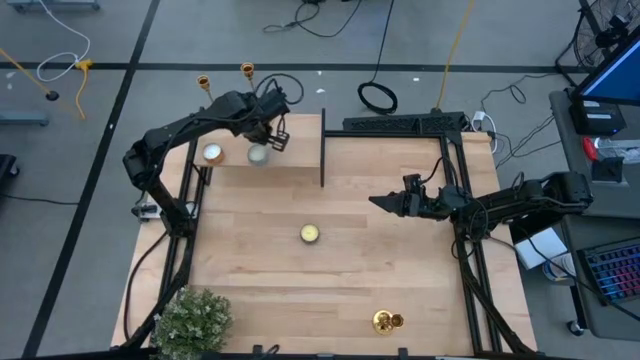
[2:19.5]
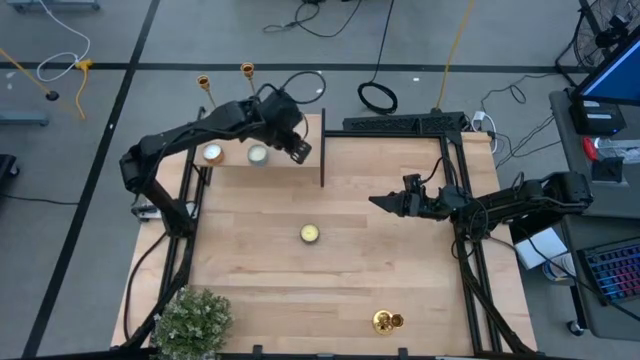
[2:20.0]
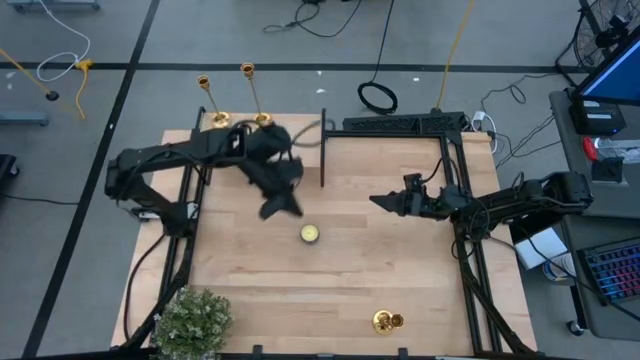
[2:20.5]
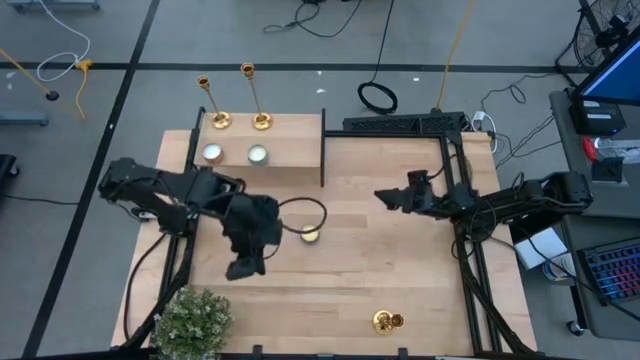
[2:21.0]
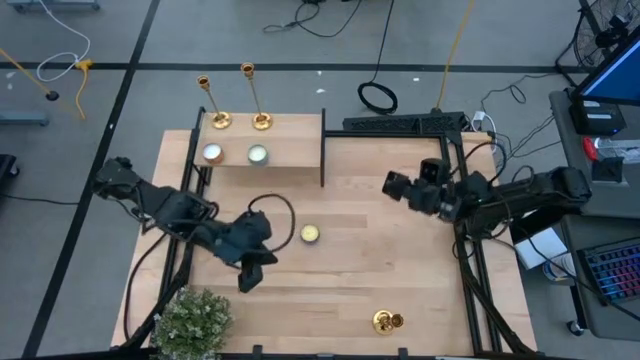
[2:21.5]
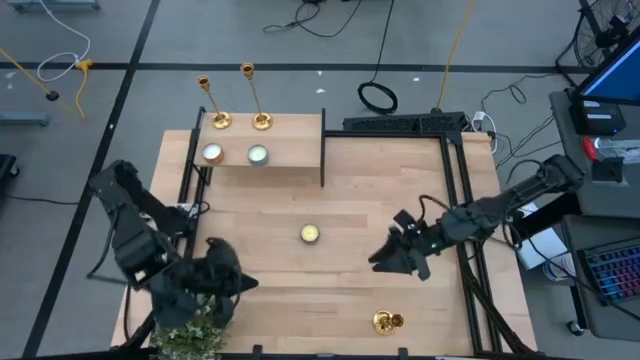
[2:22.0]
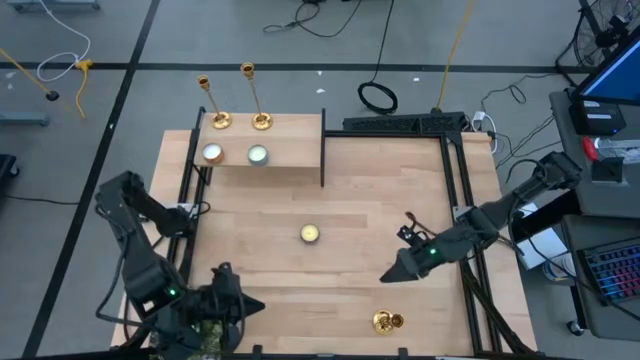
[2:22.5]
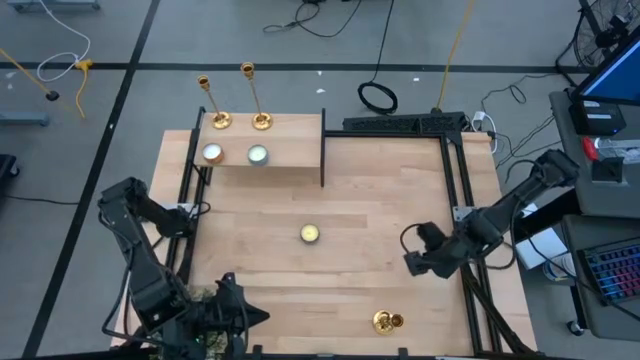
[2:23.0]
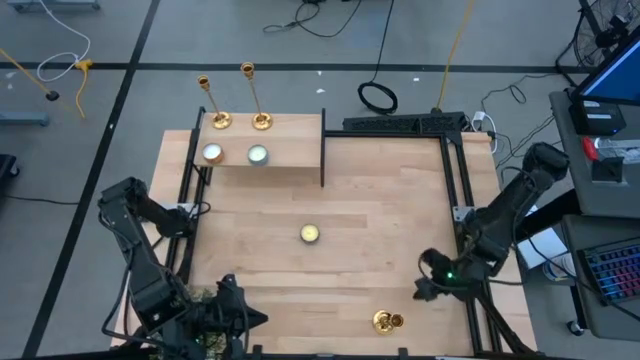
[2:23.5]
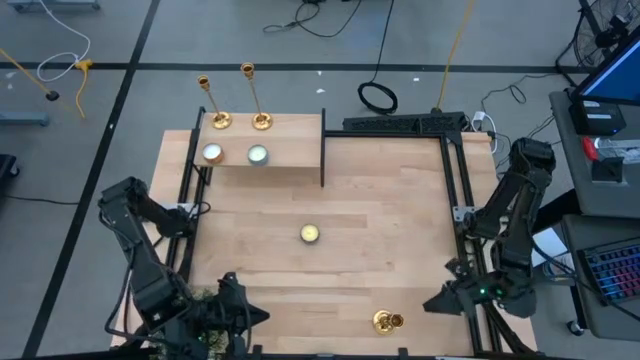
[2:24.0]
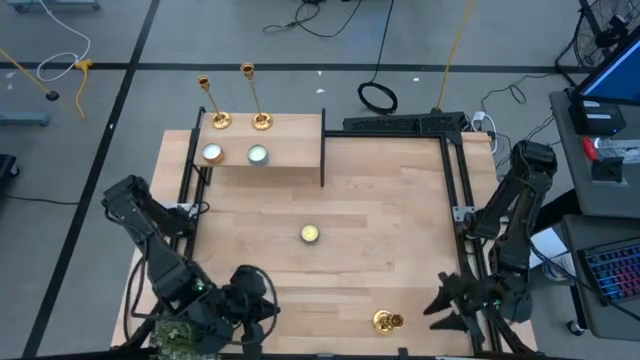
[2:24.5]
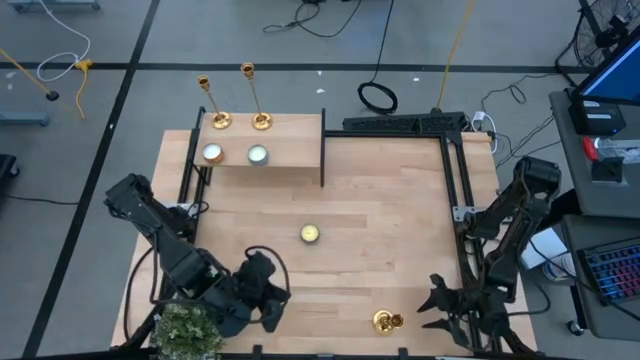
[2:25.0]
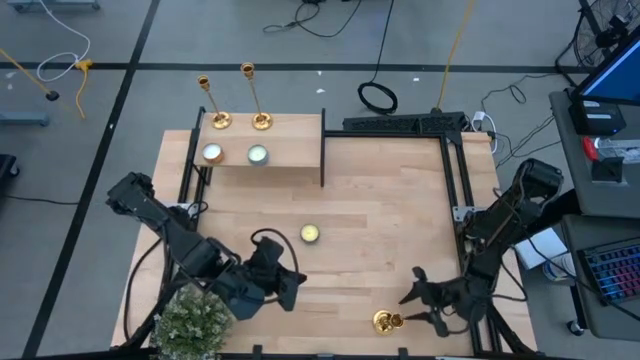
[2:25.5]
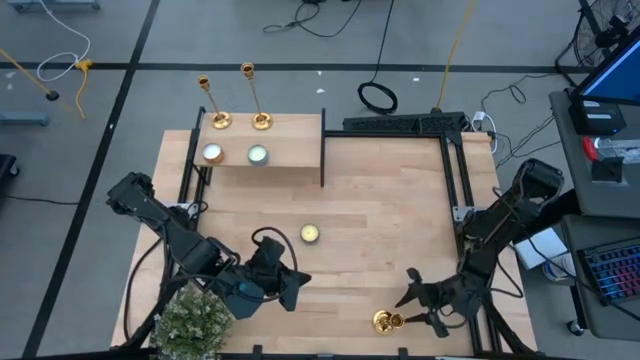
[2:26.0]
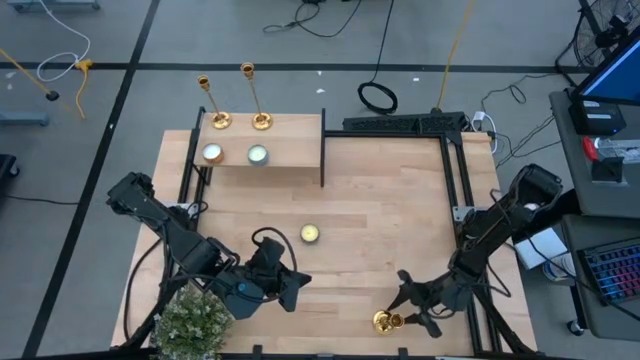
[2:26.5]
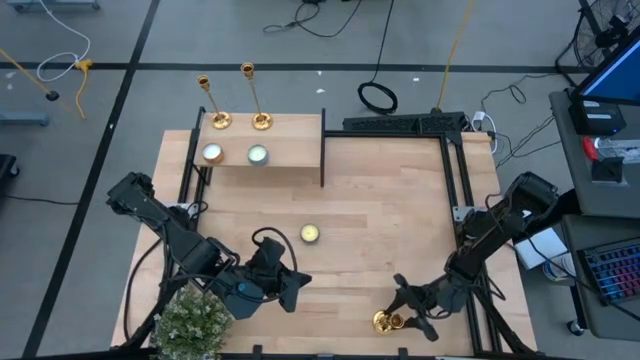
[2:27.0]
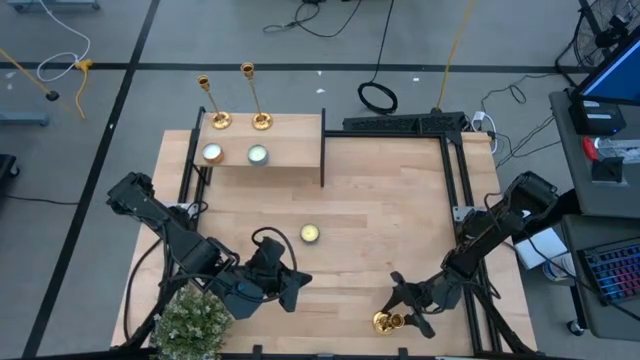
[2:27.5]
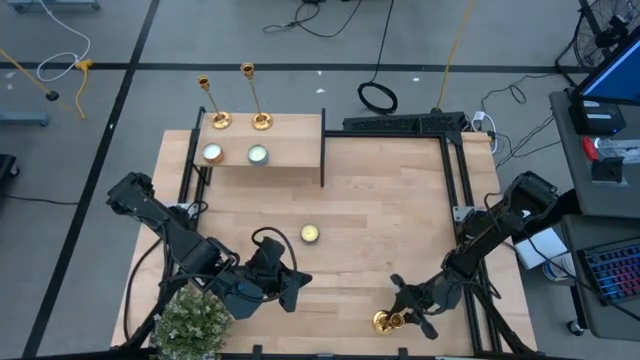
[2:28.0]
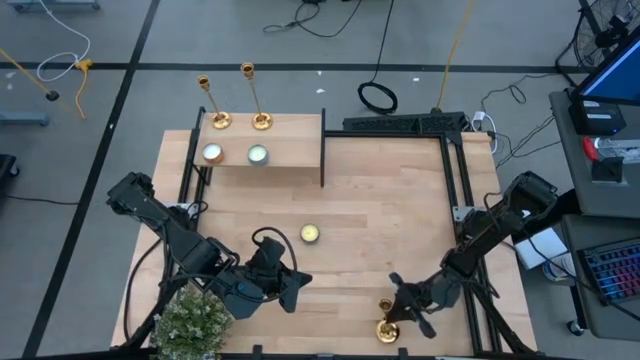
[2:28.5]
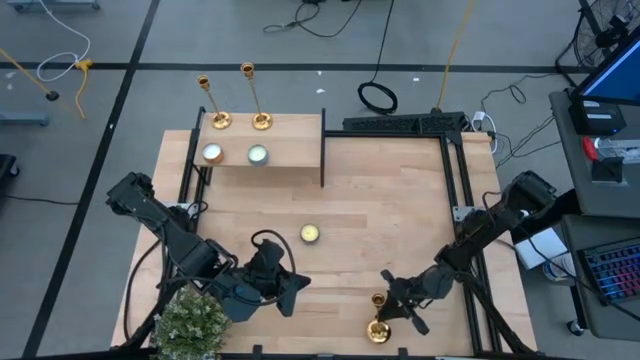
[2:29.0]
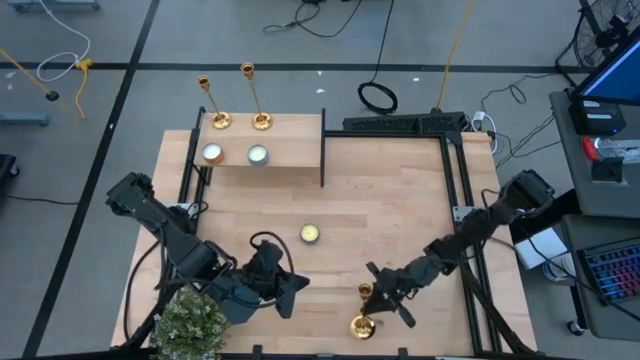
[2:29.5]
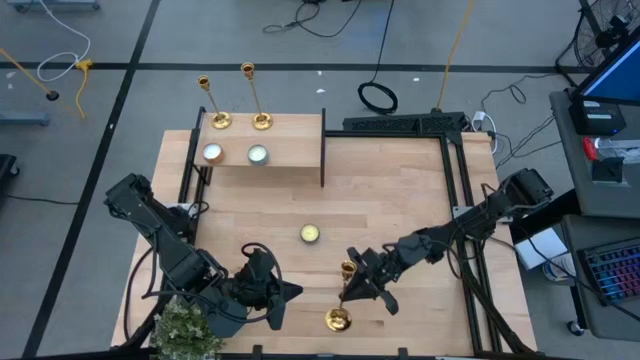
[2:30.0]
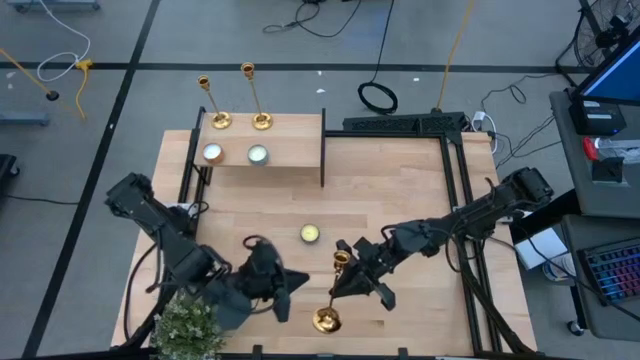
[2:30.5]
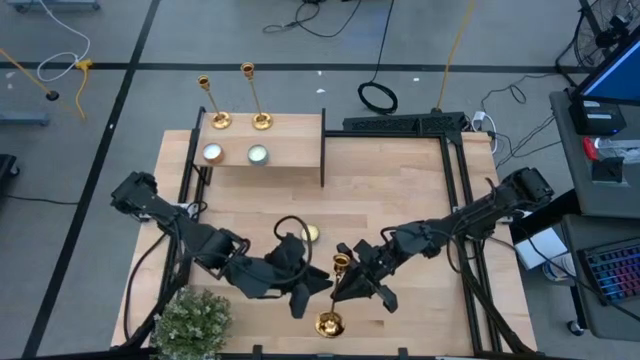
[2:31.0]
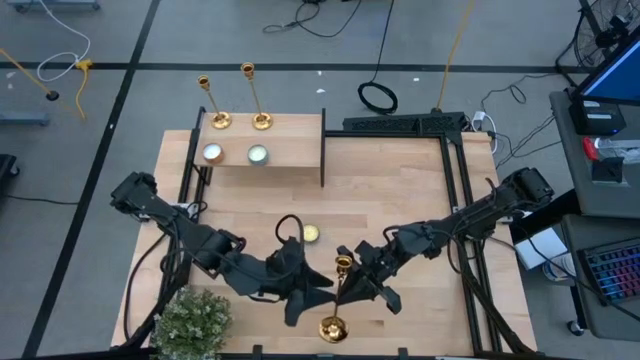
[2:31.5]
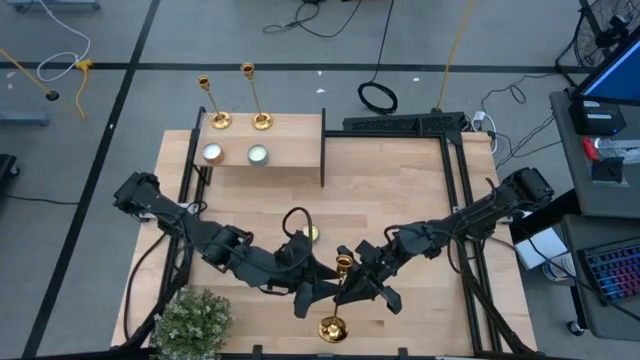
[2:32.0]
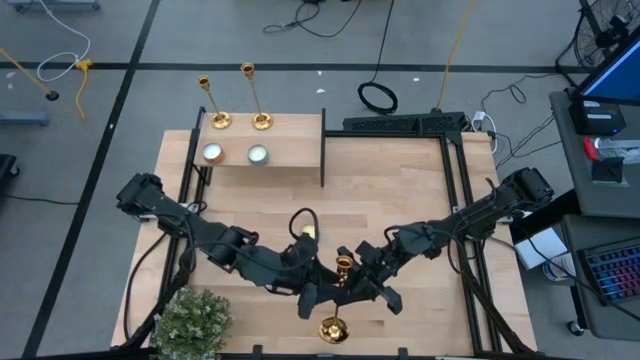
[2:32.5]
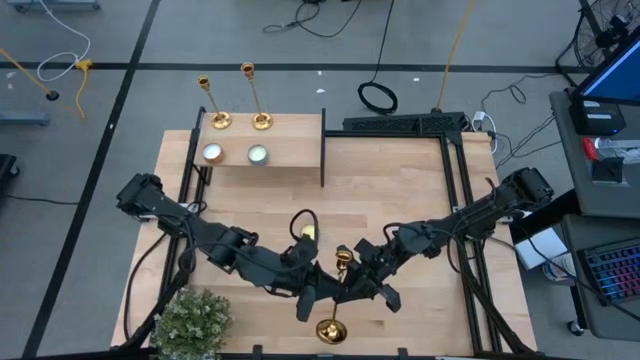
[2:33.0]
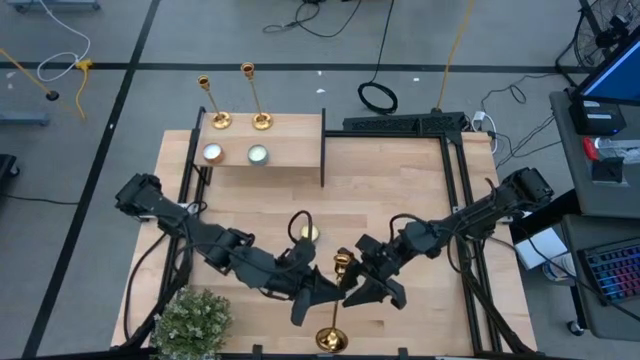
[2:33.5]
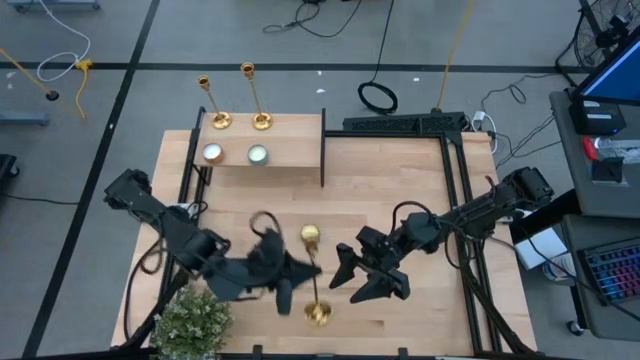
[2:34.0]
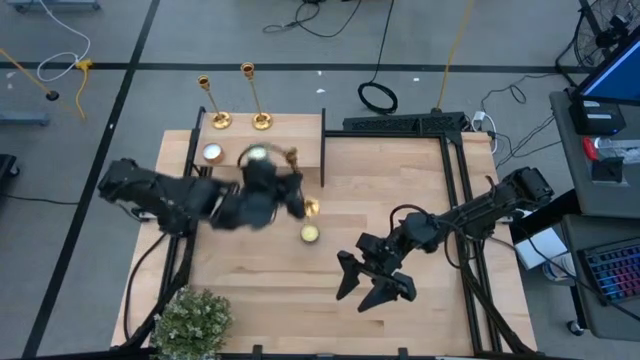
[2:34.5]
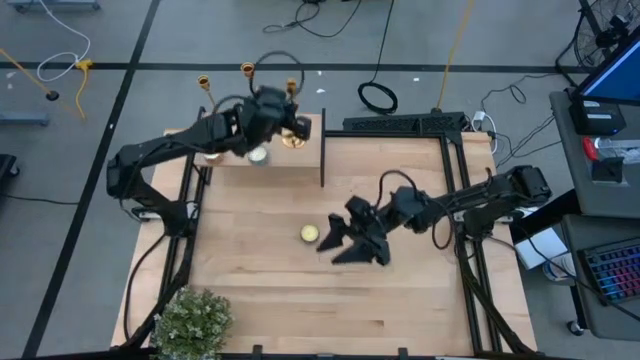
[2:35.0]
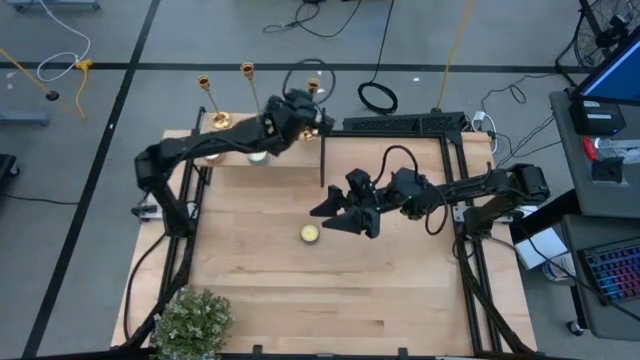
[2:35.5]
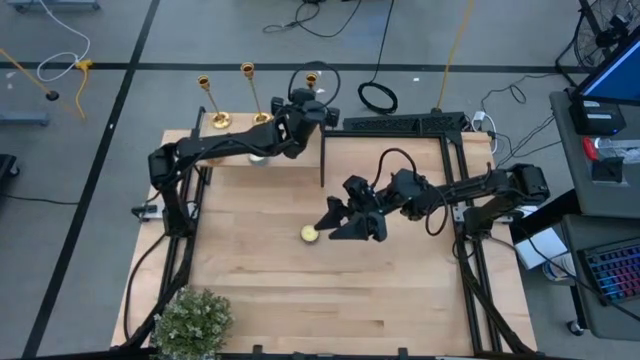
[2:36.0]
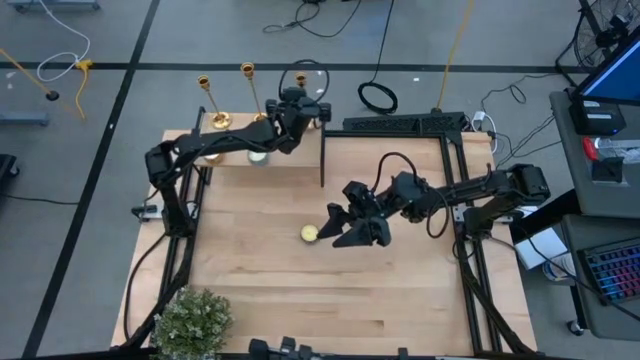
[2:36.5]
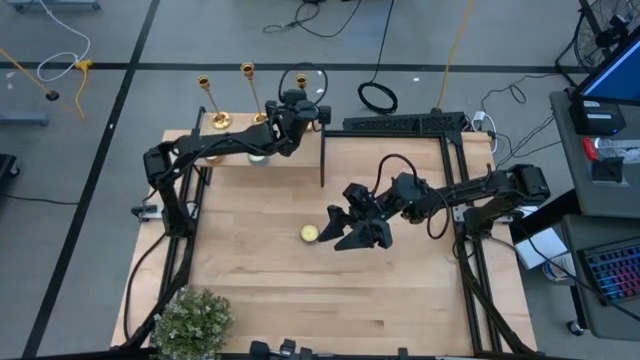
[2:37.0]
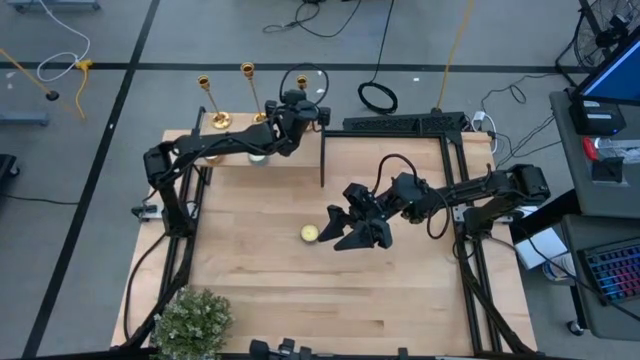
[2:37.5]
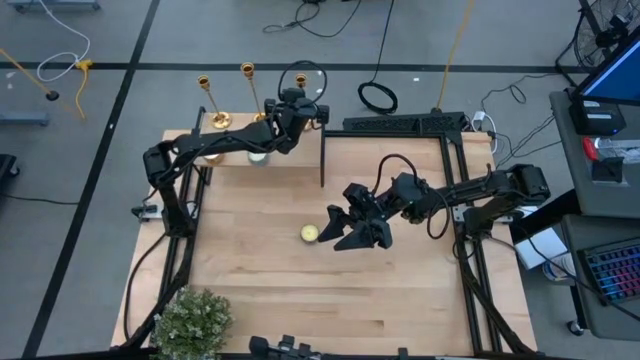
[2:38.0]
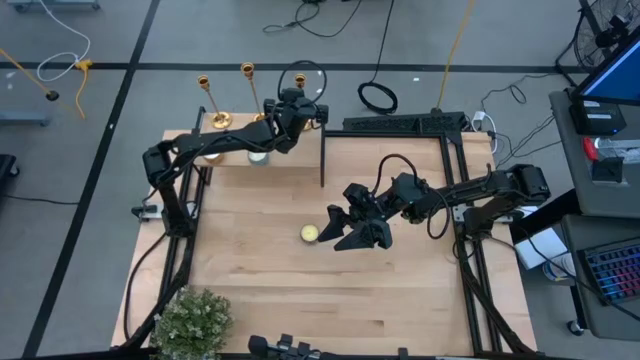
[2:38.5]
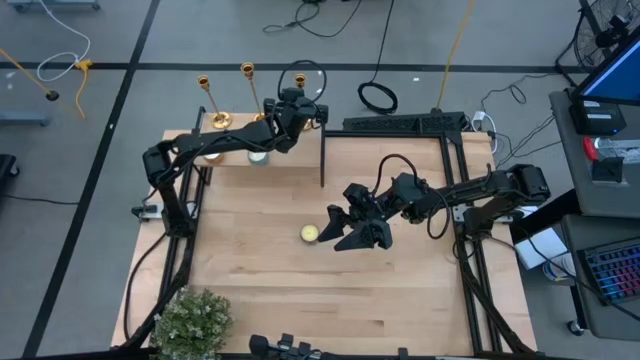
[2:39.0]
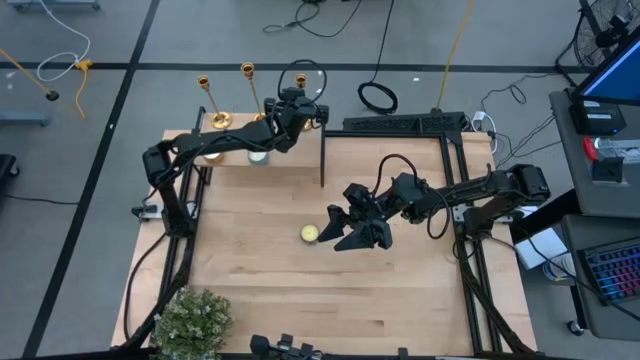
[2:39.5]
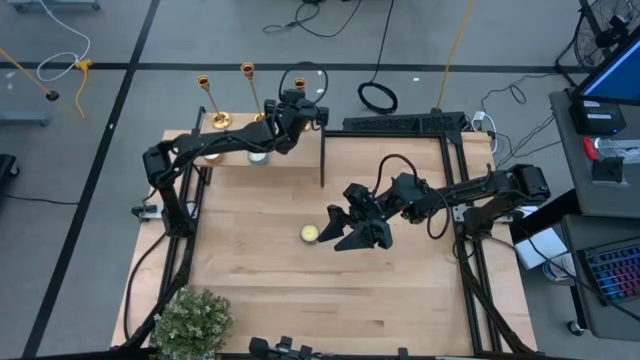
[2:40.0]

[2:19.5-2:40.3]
Task: Pick & Place candle stick holders
Put the gold candle holder on the shelf
